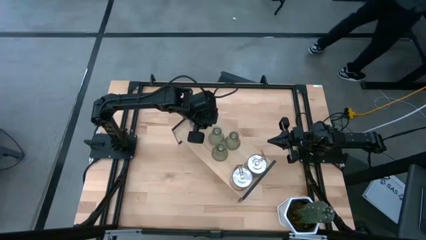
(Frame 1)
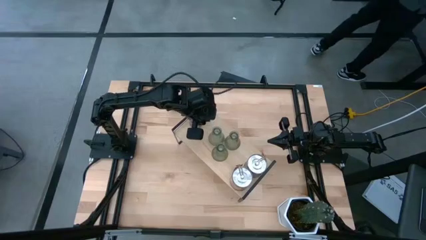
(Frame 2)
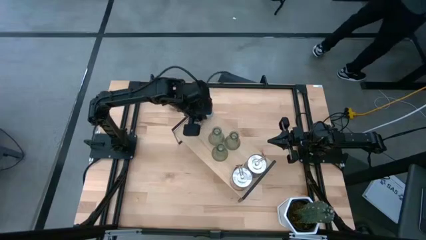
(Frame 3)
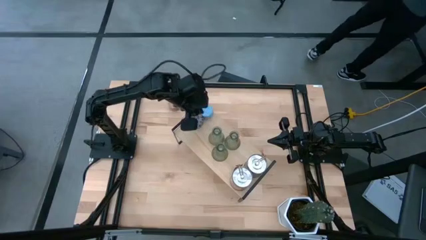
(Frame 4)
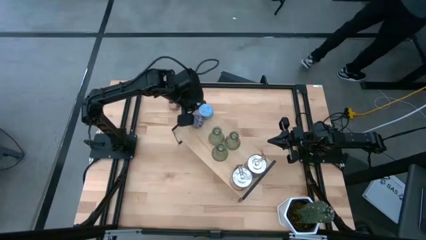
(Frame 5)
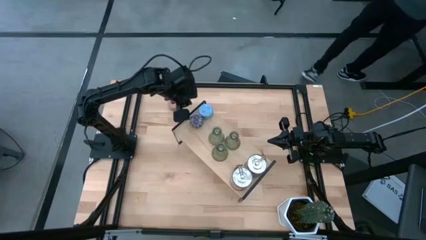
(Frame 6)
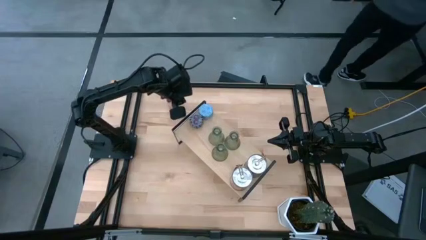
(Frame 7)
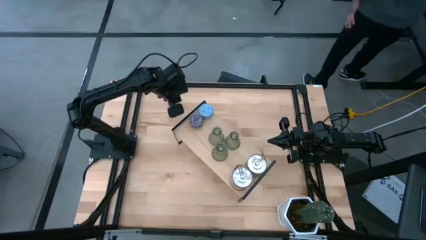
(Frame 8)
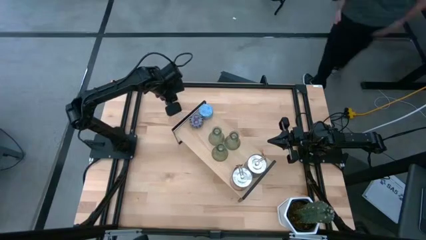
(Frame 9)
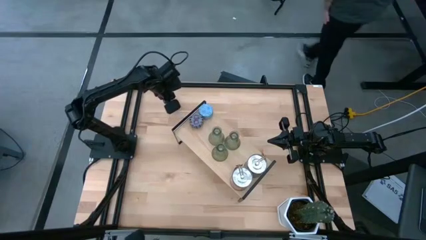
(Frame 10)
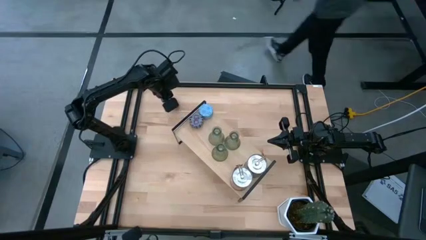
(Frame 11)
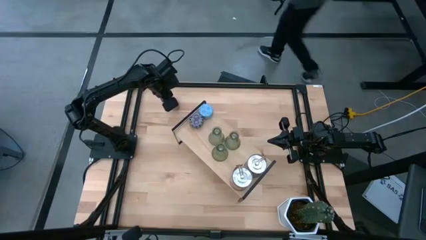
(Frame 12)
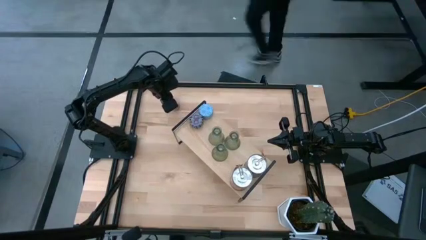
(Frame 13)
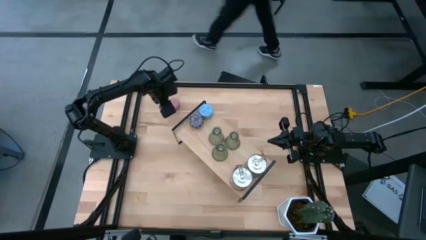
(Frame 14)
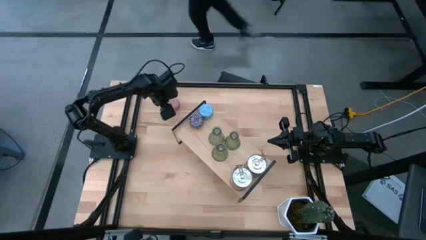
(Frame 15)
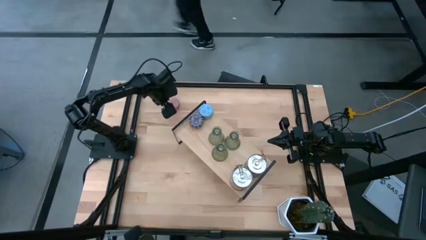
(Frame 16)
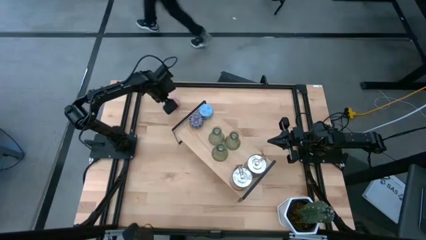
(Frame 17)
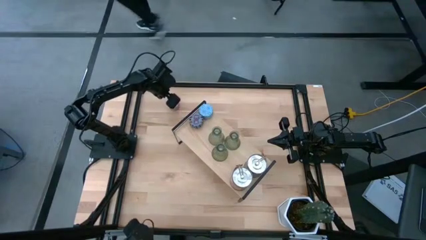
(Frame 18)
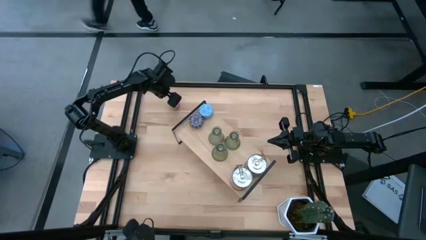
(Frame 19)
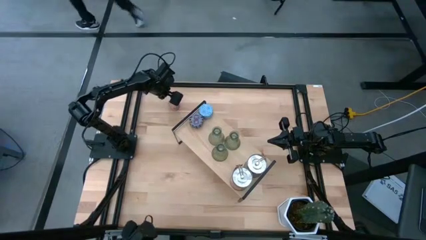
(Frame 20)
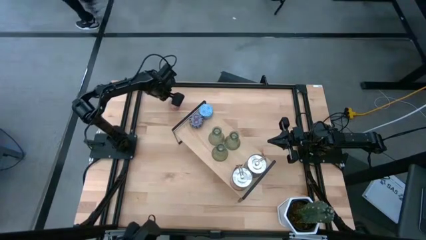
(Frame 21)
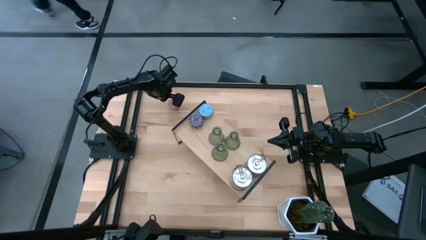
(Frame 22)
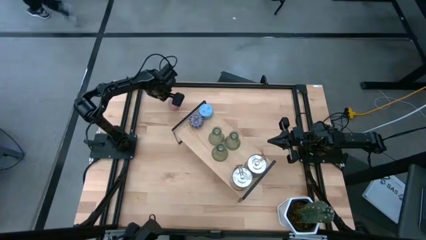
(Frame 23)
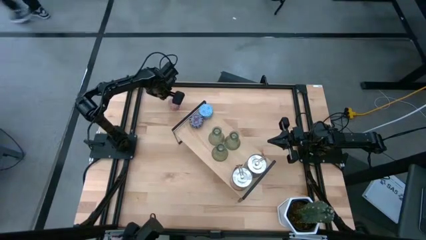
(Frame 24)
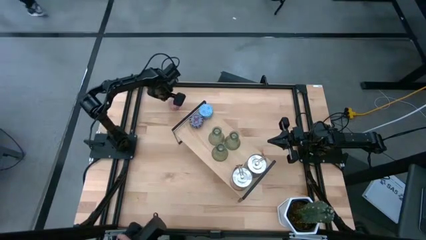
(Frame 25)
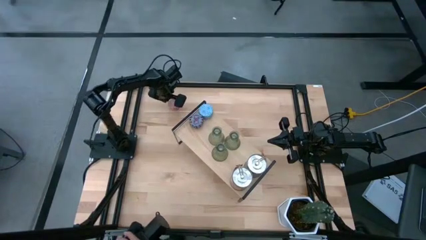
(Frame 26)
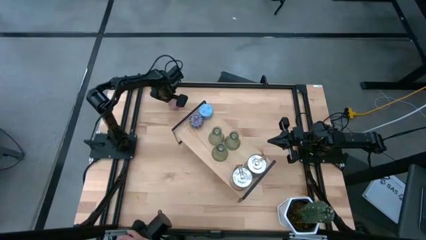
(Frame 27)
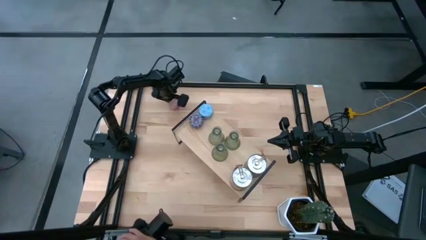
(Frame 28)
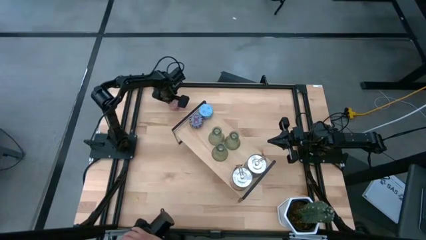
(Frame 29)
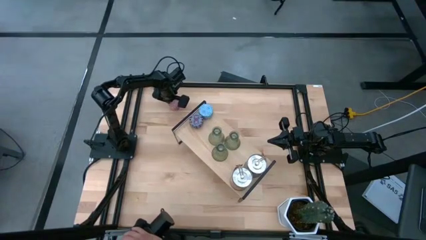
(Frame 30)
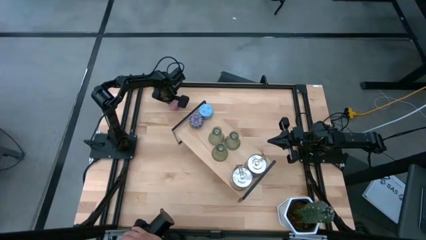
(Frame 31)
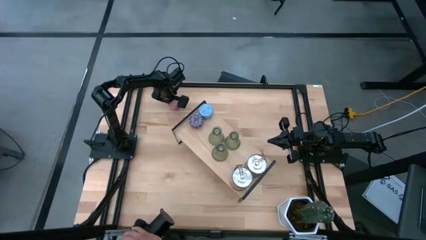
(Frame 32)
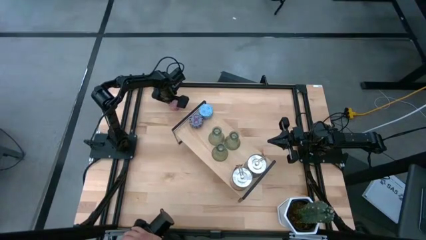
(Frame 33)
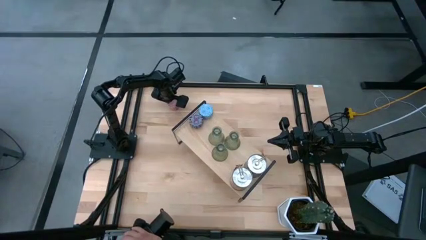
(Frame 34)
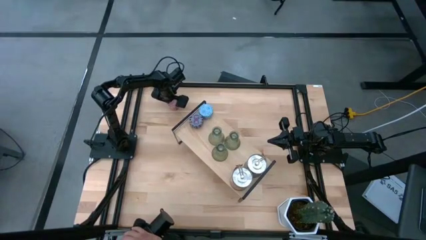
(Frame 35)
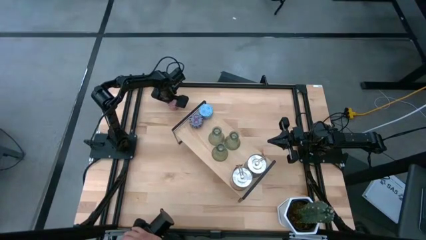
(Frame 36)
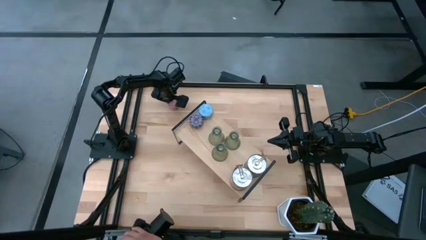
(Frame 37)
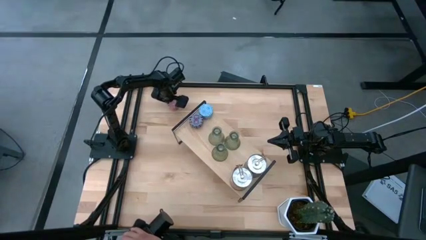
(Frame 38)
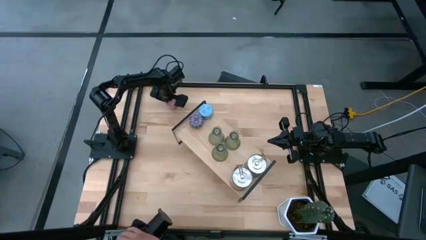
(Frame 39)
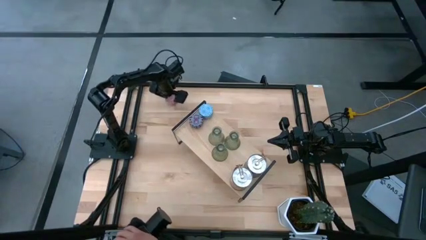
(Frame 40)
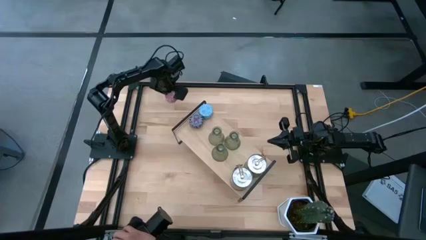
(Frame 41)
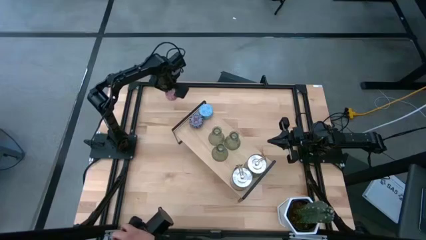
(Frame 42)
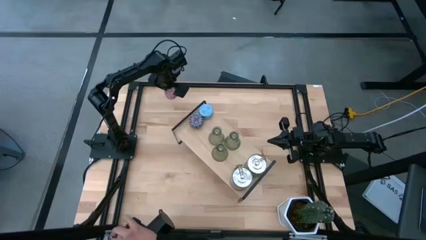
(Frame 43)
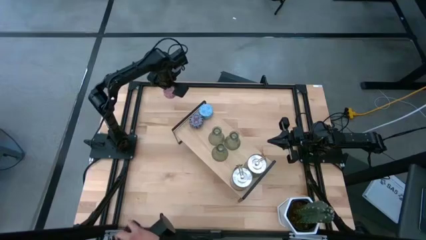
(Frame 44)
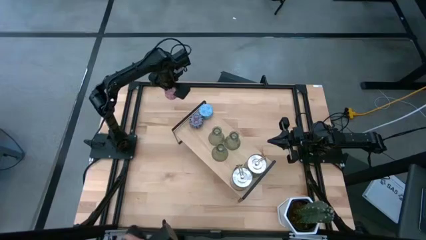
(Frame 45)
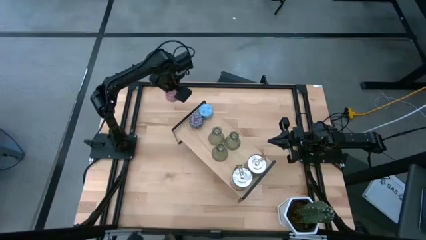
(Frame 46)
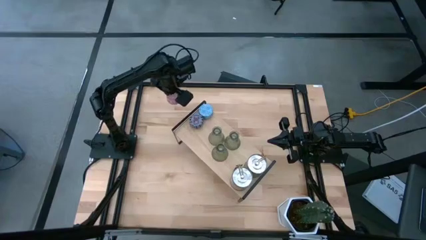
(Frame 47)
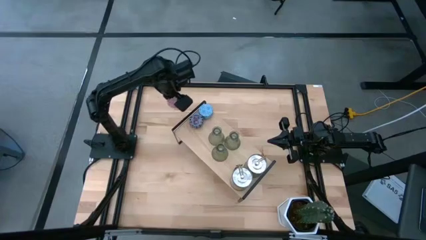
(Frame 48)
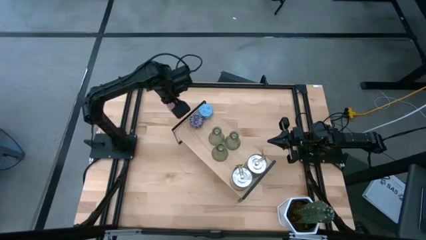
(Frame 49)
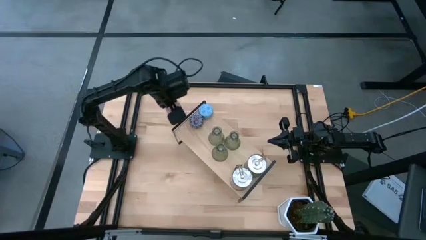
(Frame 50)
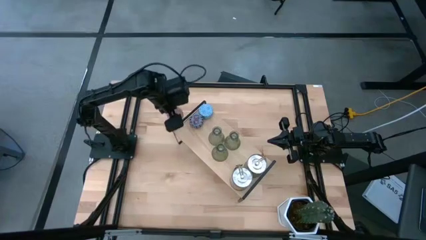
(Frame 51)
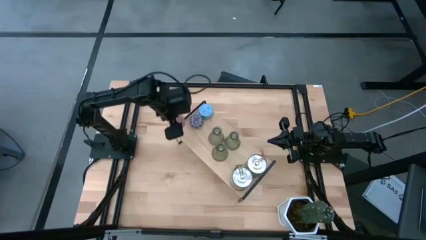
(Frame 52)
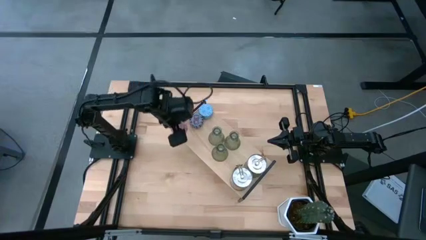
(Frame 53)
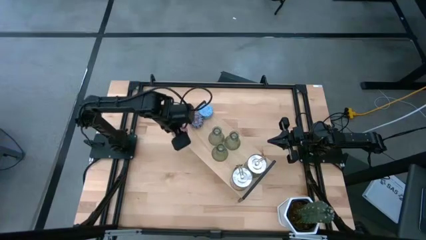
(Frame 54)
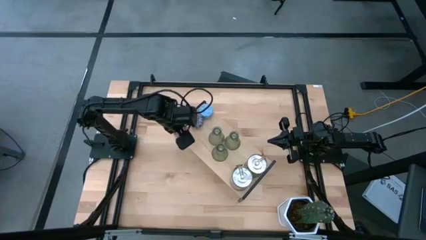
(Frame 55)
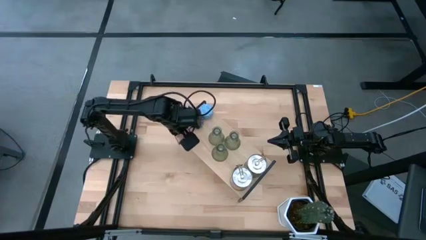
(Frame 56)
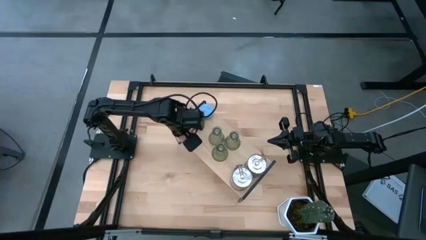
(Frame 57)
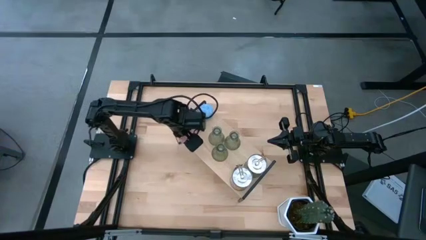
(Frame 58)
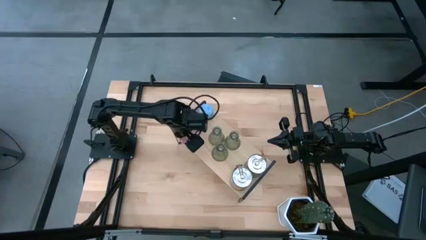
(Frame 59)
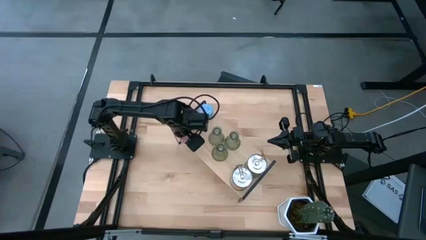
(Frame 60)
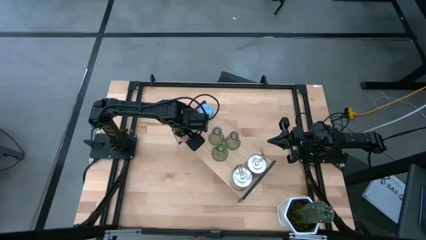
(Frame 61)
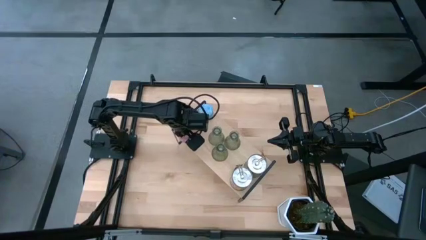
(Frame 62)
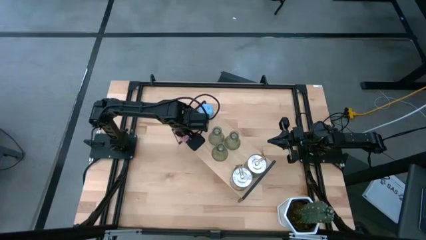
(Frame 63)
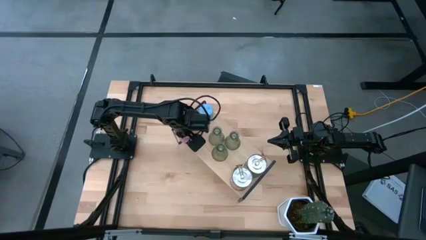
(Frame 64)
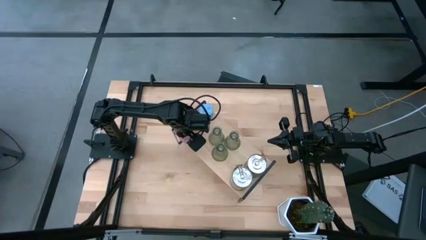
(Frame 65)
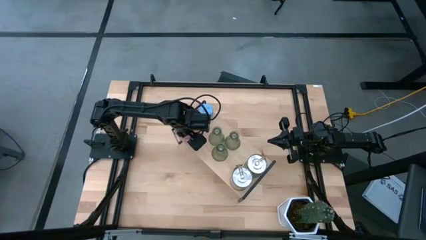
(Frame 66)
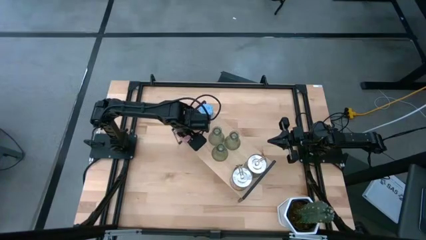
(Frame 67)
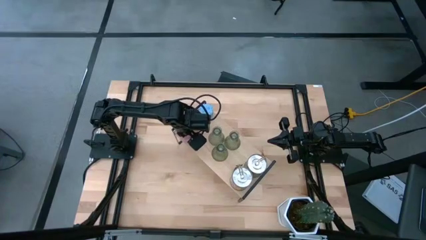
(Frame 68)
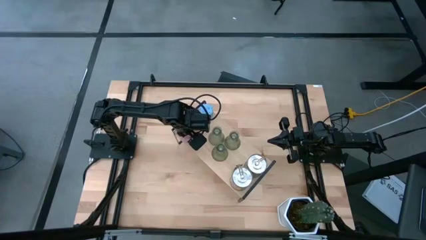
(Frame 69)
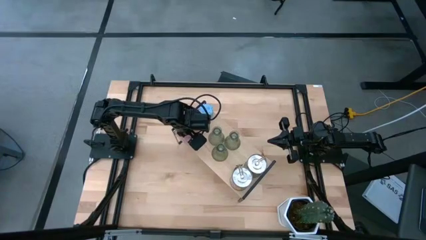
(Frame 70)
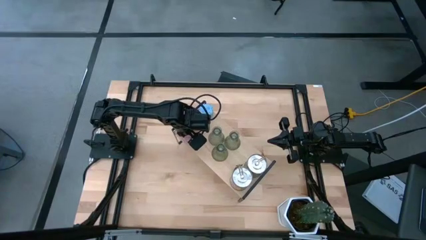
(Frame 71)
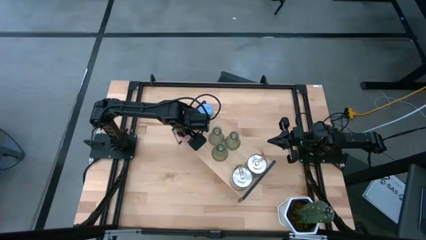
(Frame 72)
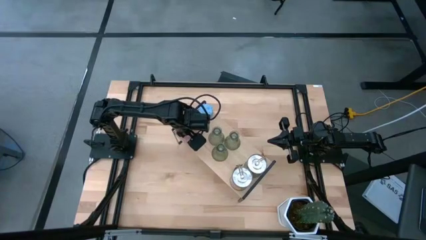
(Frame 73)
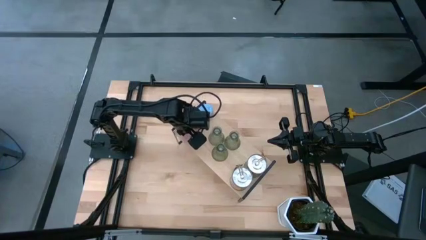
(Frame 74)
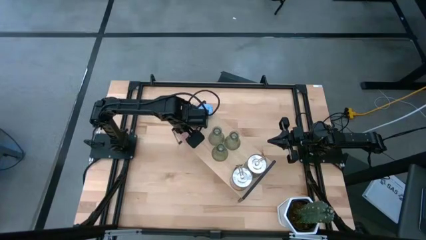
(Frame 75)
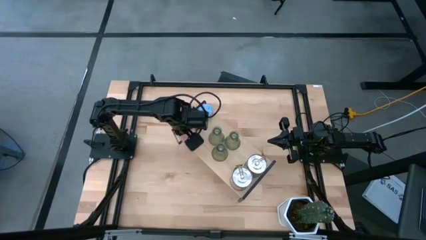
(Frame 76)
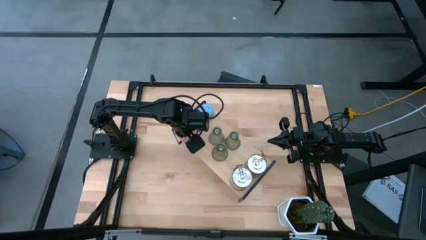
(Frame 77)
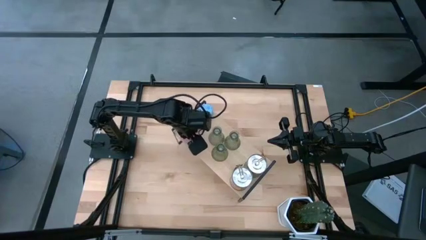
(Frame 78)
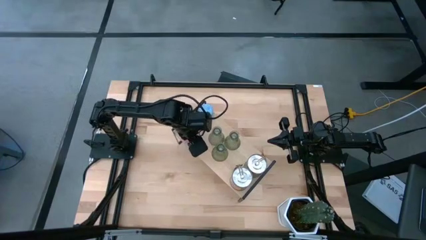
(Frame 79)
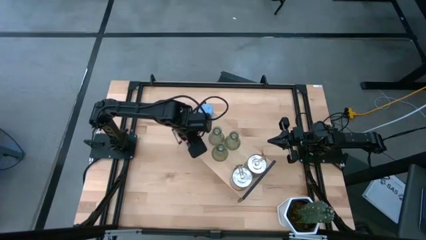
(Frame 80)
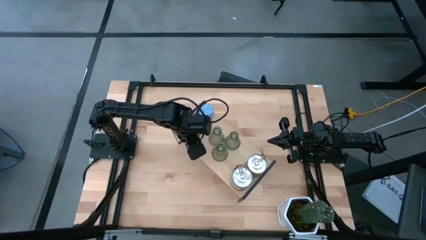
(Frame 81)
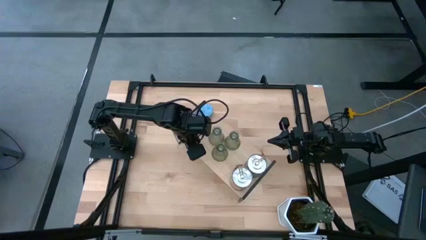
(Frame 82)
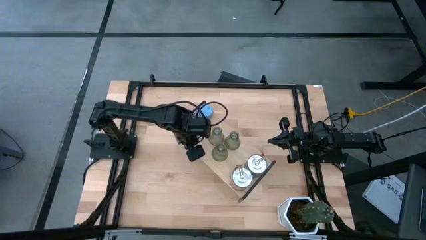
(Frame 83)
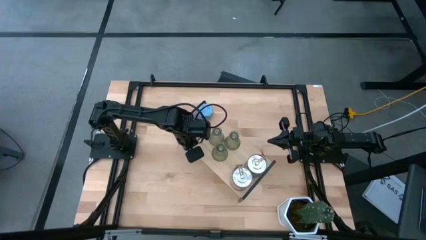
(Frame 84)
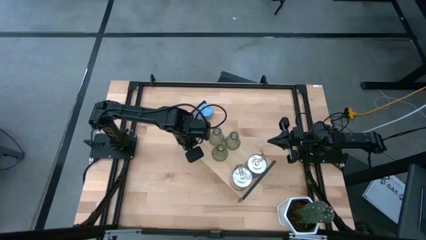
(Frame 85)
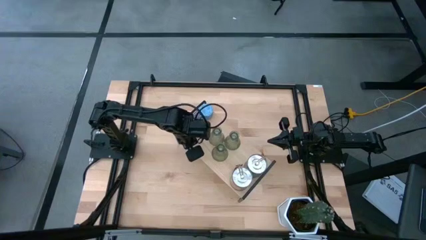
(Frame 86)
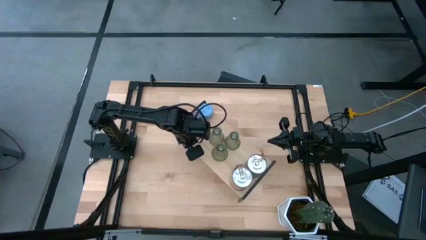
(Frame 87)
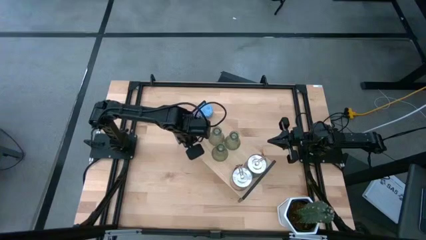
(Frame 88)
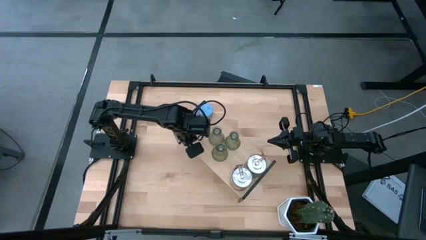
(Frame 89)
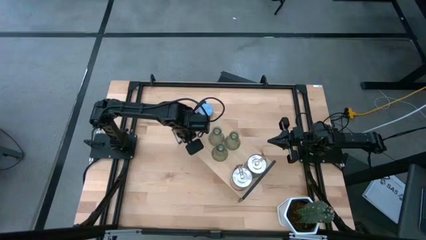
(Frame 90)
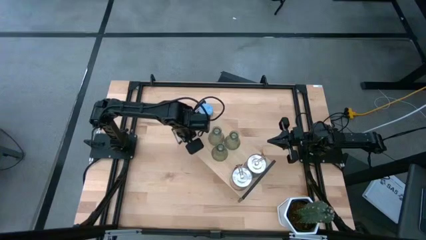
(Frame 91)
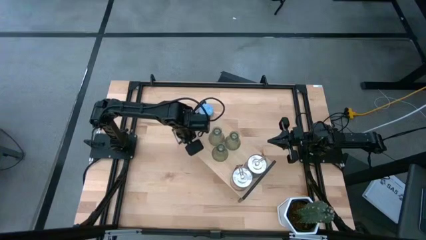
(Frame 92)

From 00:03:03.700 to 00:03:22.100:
Task: Pick & Place candle stick holders
Put the pink yellow scented candle on the shelf
